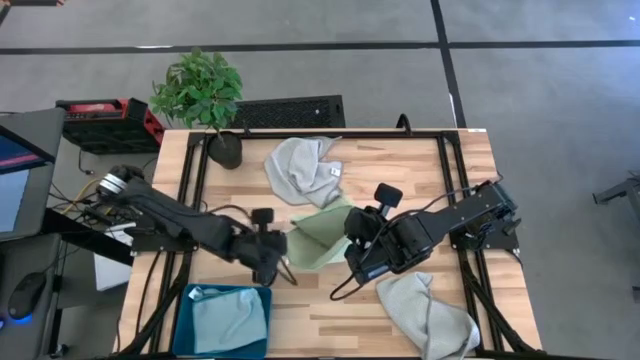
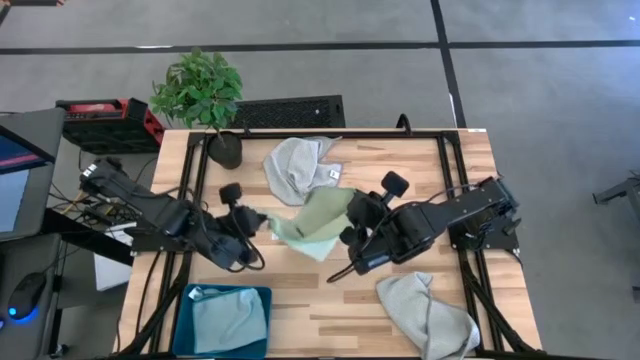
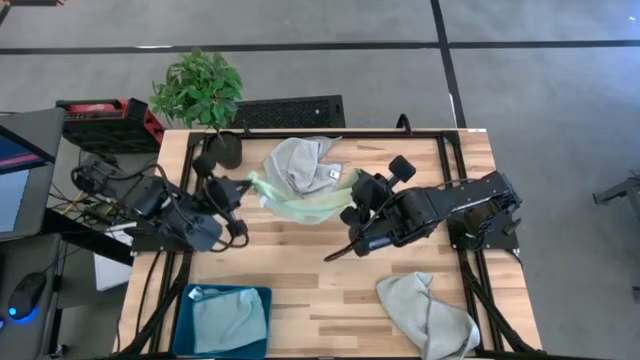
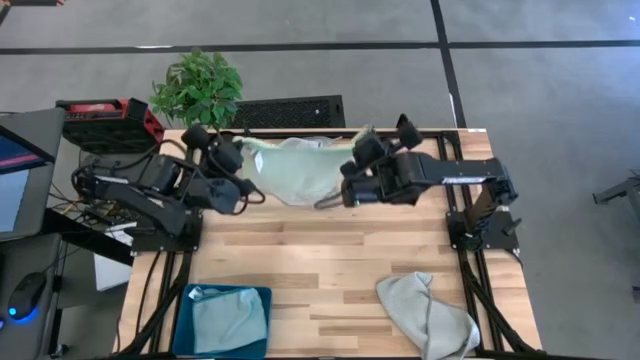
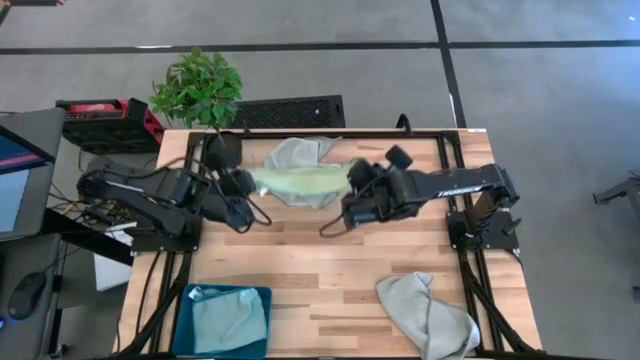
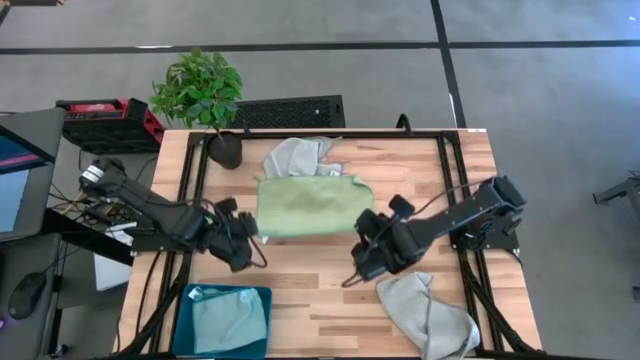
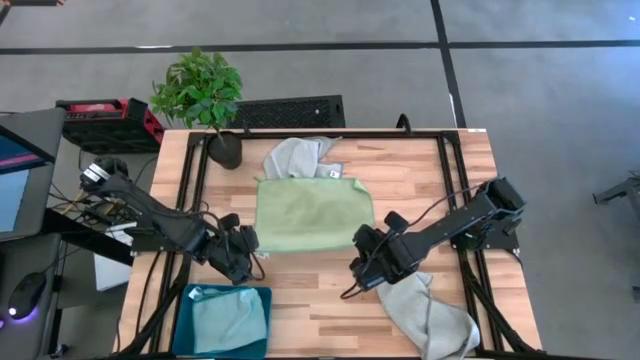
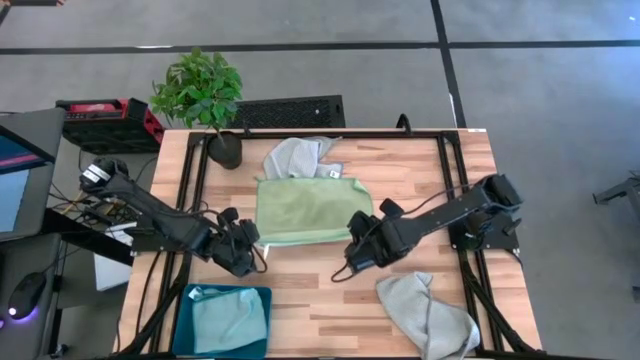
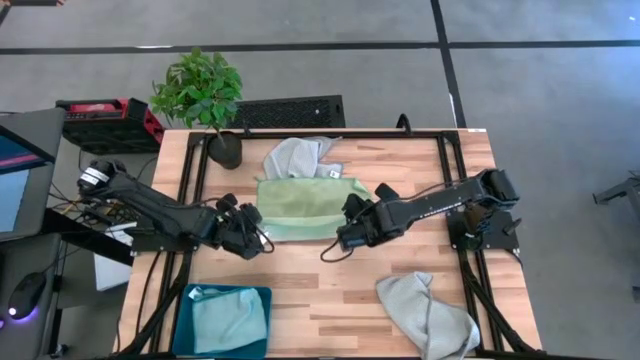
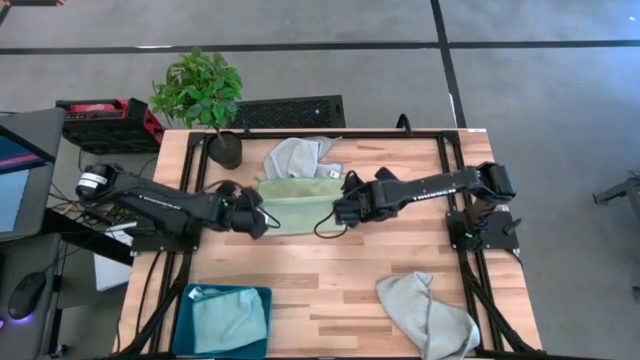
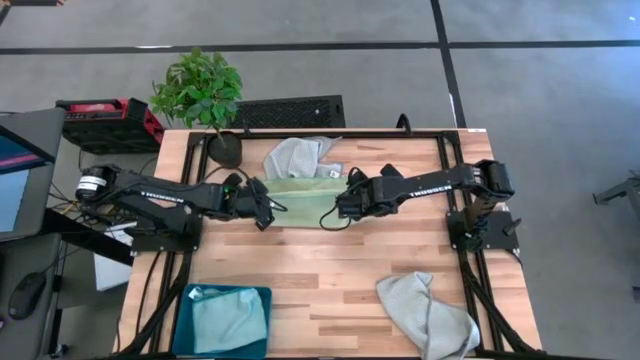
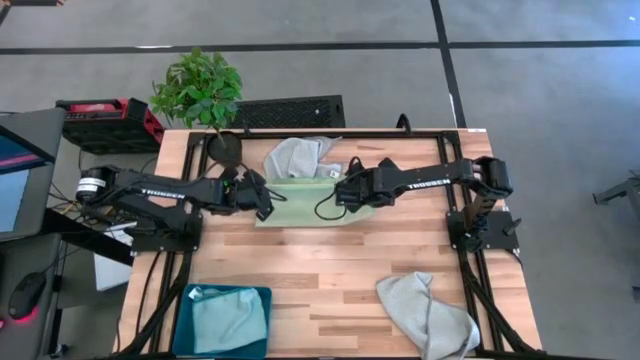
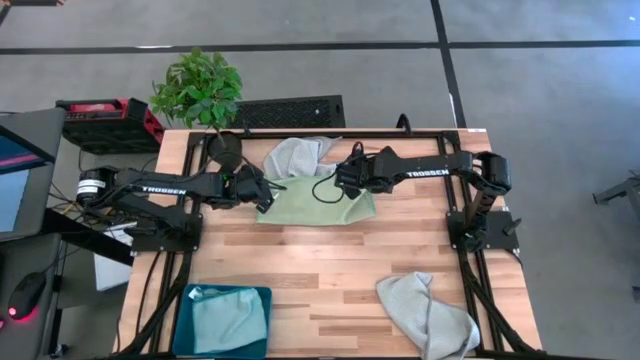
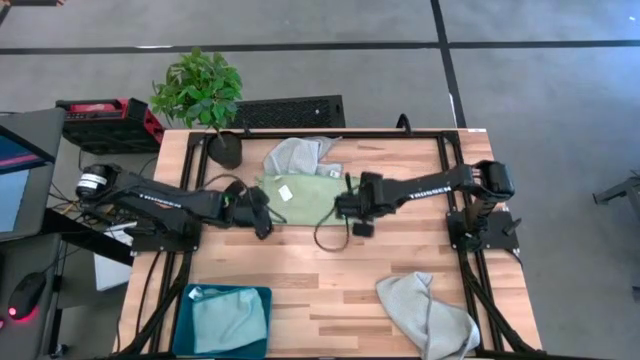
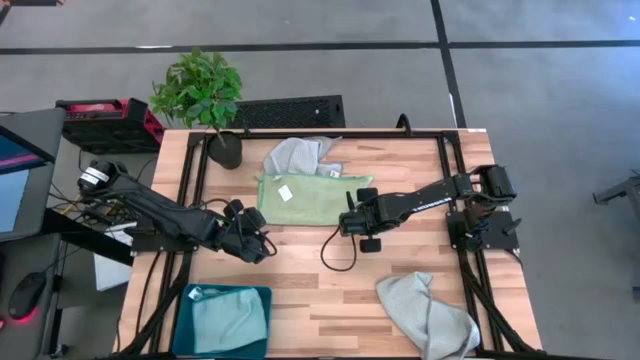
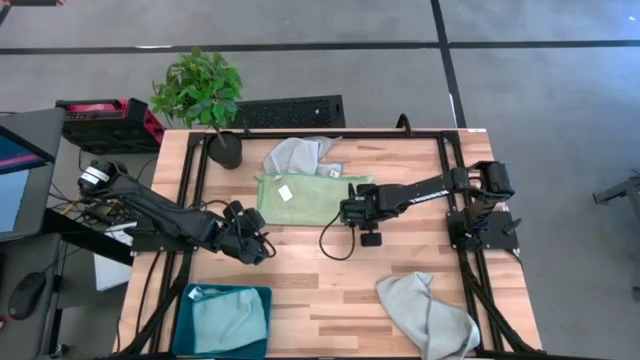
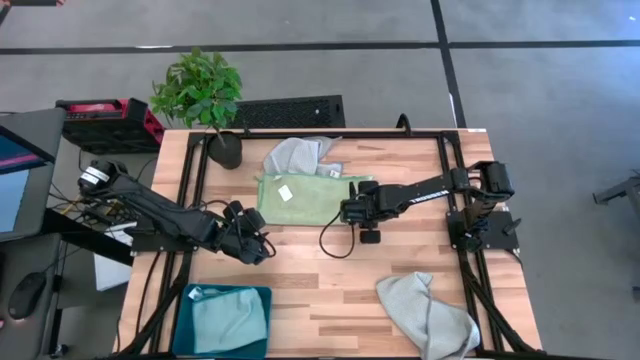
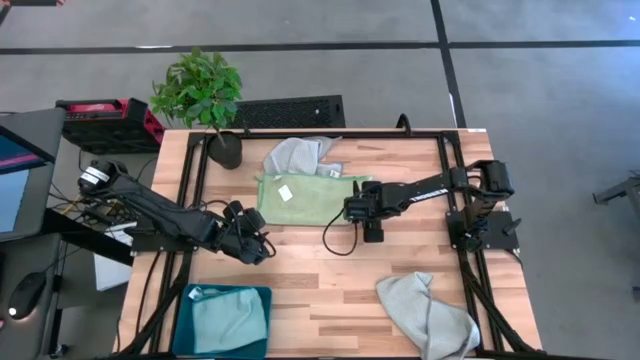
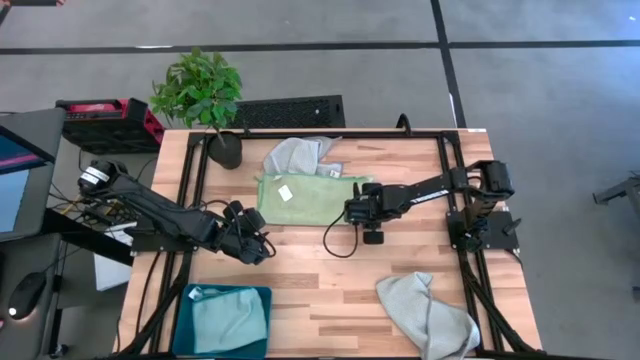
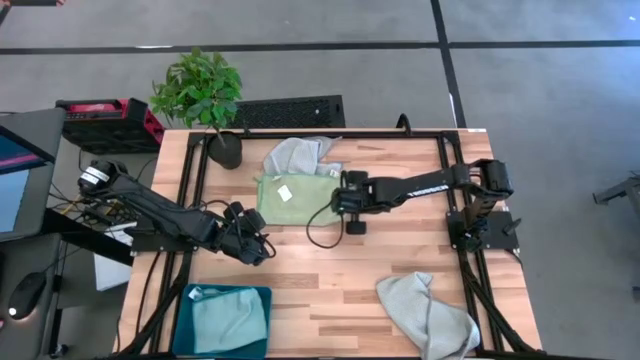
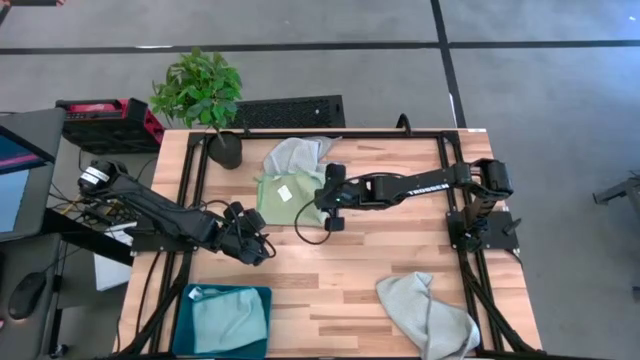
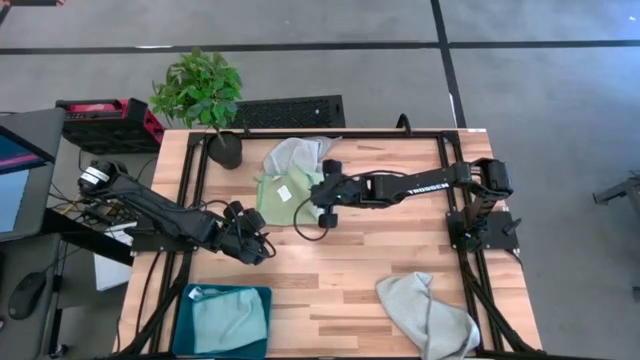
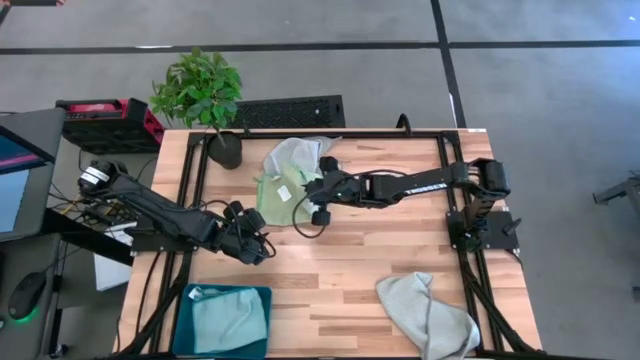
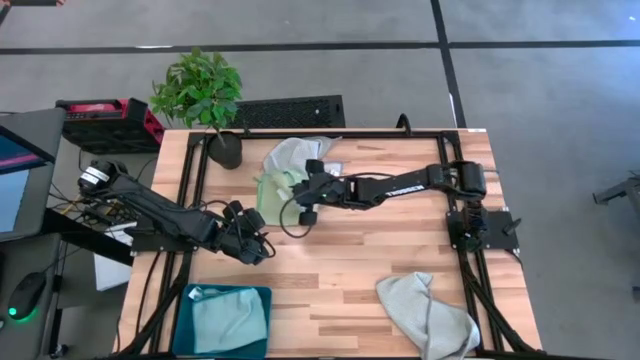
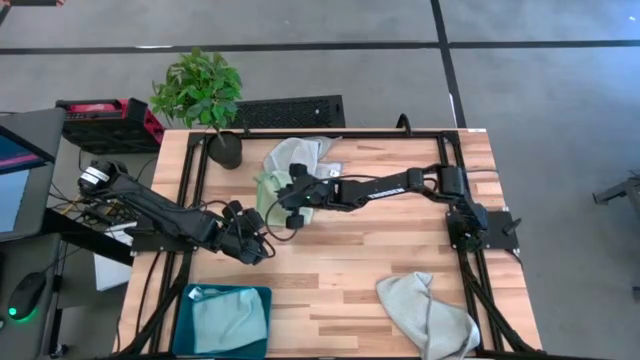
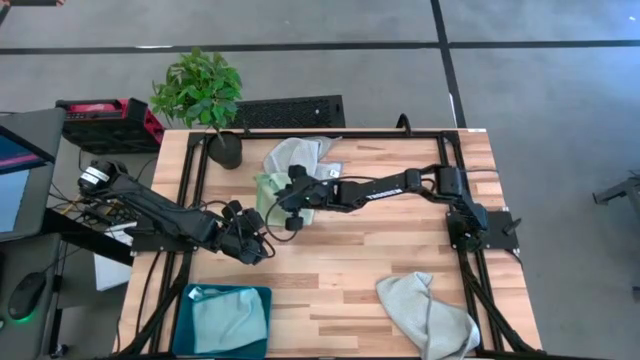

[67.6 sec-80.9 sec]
Task: Fold microfiber towels
Fold the green microfiber cloth

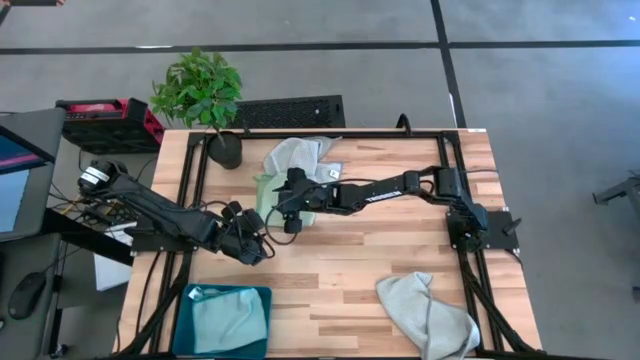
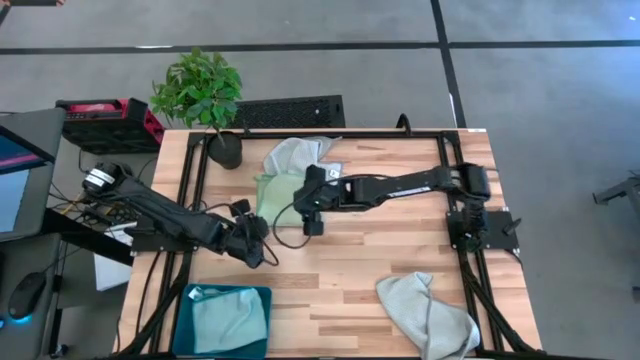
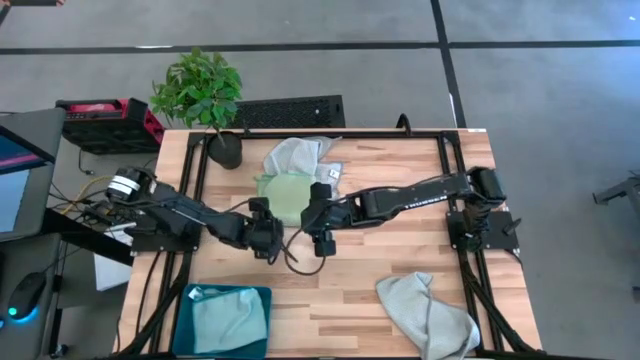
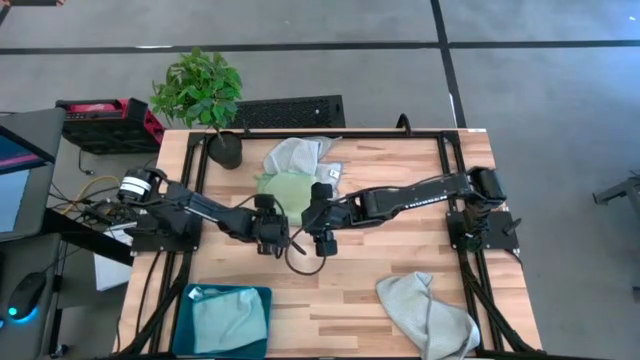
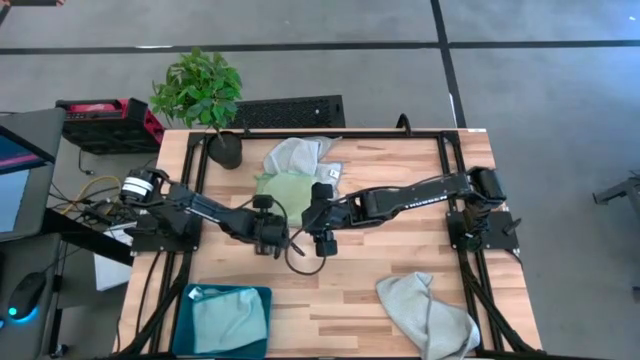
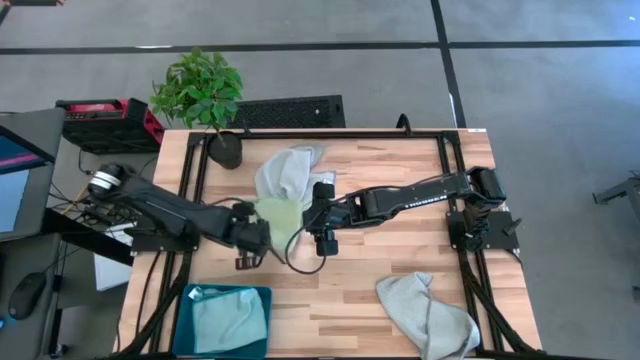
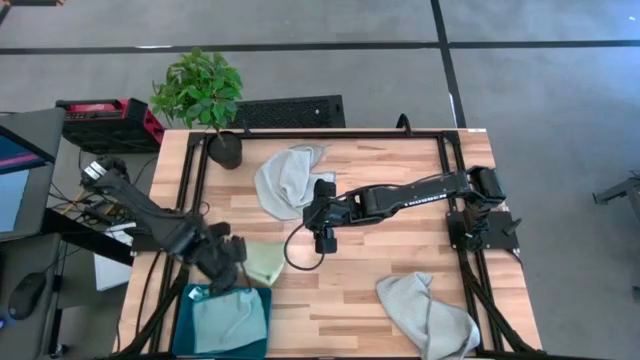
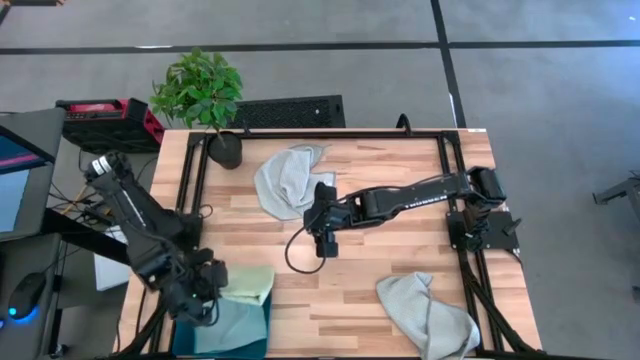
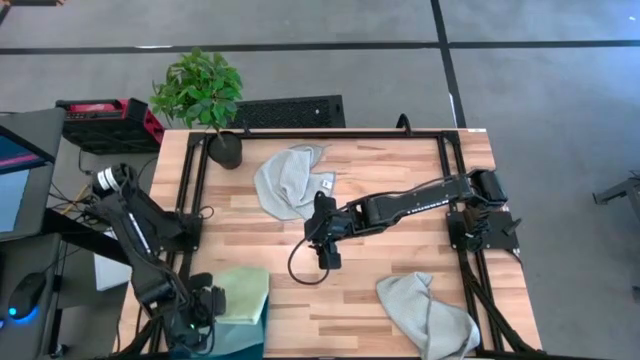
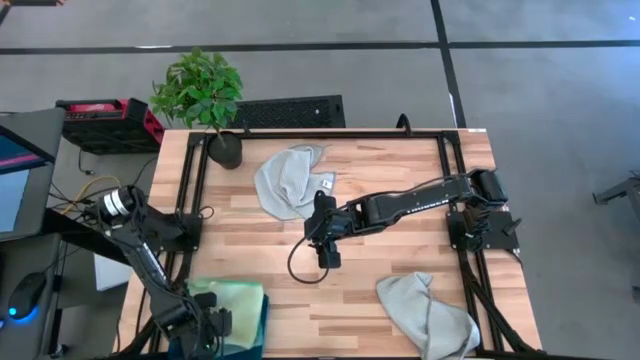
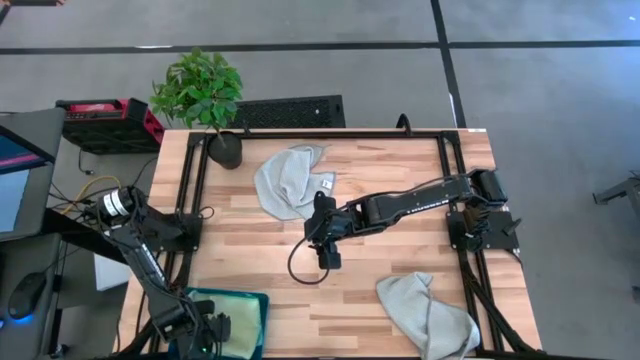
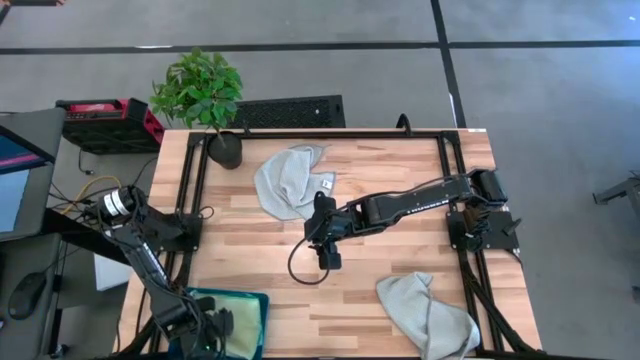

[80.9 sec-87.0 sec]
Stack the green microfiber cloth on top of the blue microfiber cloth into the bin

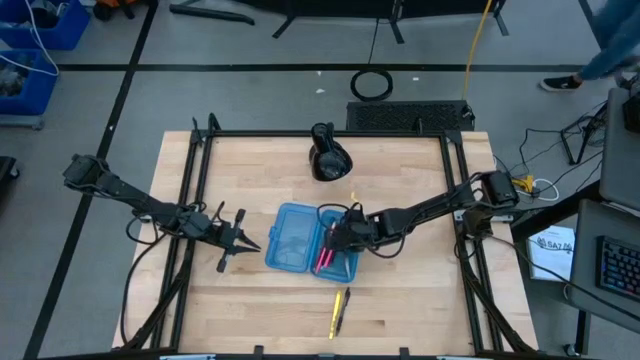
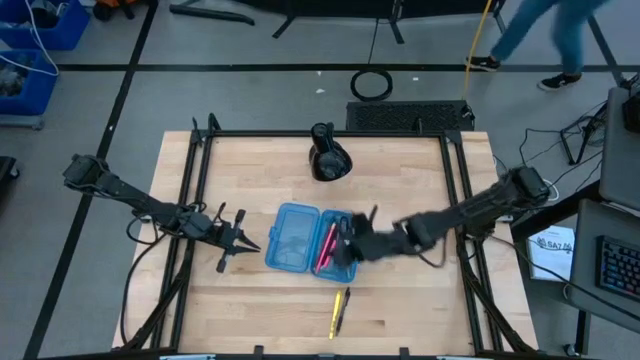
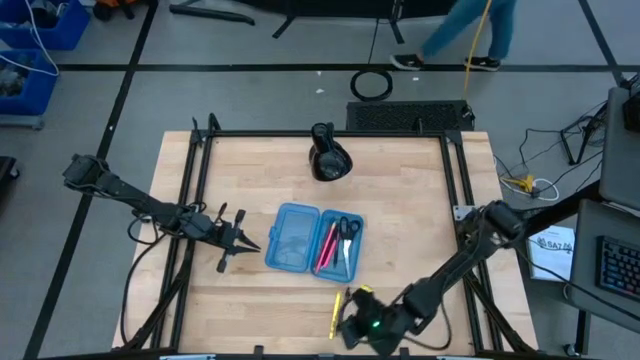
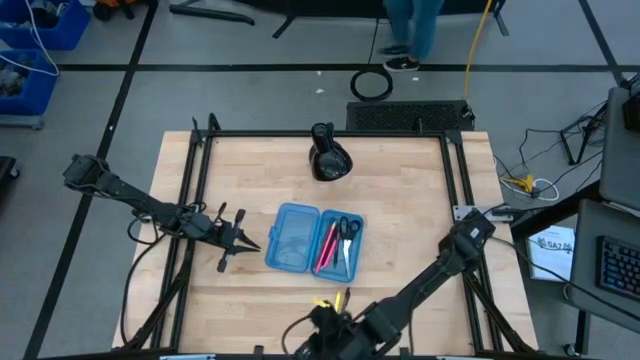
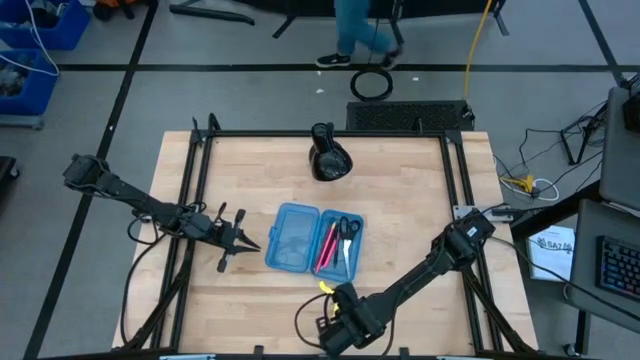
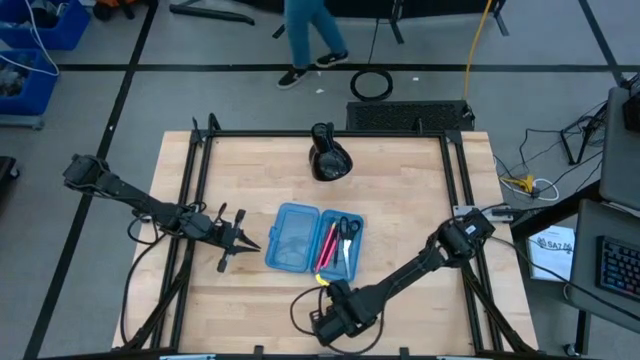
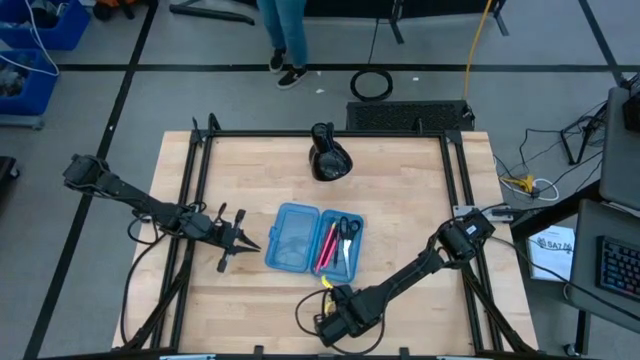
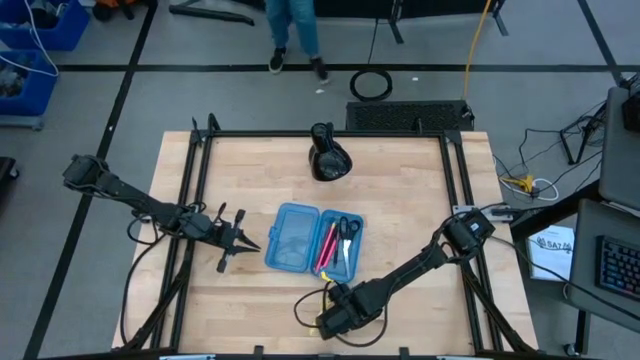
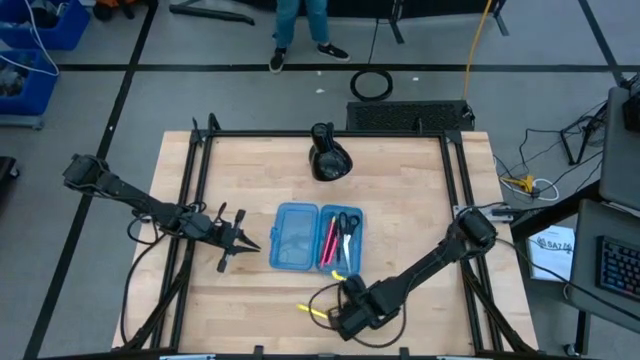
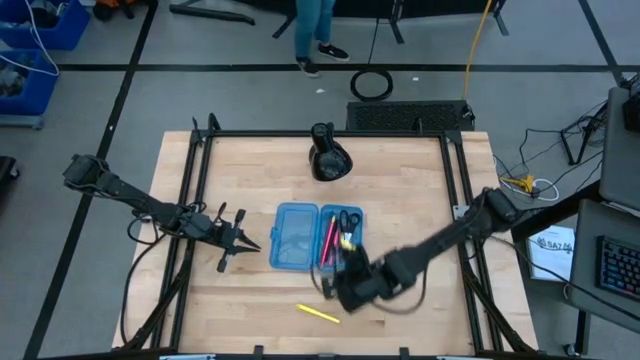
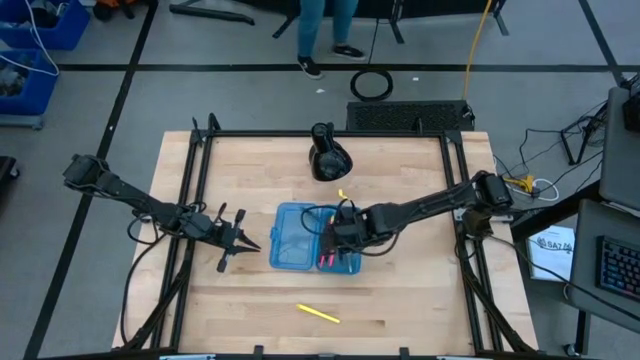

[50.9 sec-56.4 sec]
Task: Pick & place school supplies into a supply box
Put the black pen into the blue supply box
